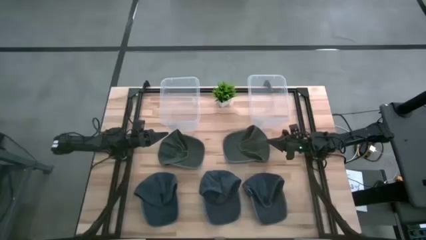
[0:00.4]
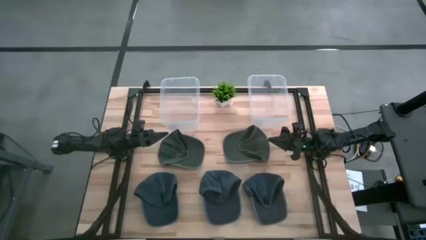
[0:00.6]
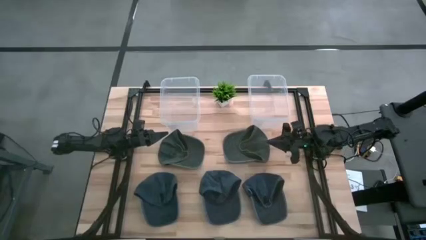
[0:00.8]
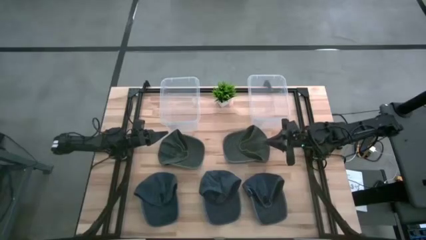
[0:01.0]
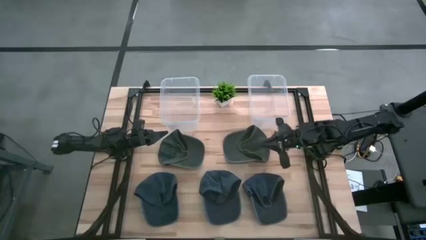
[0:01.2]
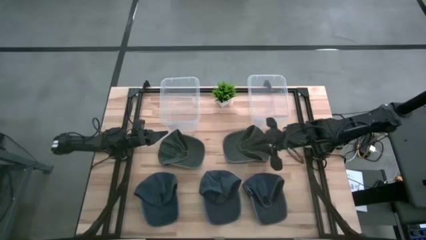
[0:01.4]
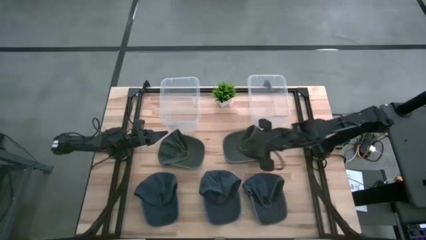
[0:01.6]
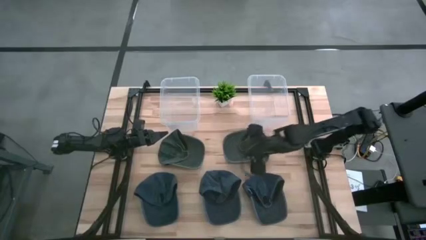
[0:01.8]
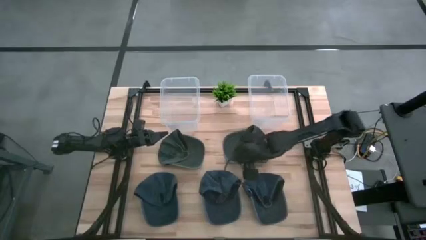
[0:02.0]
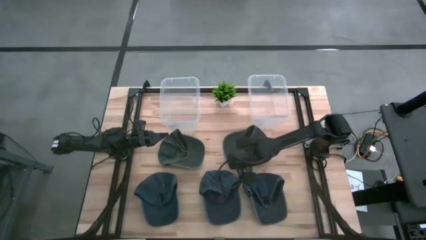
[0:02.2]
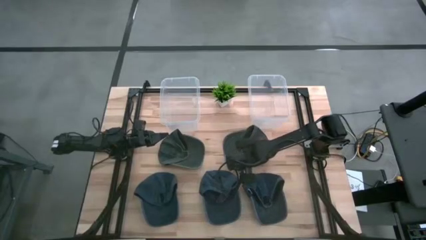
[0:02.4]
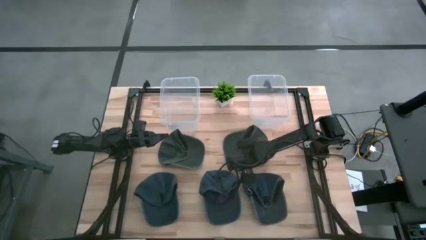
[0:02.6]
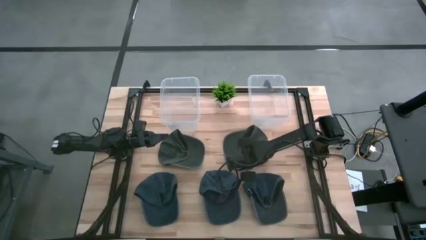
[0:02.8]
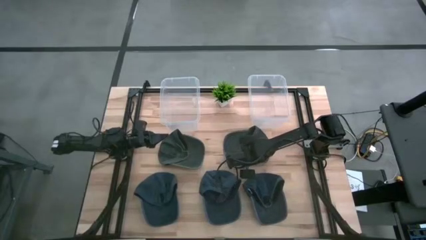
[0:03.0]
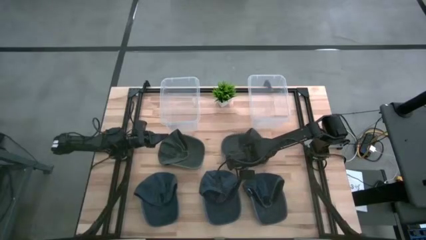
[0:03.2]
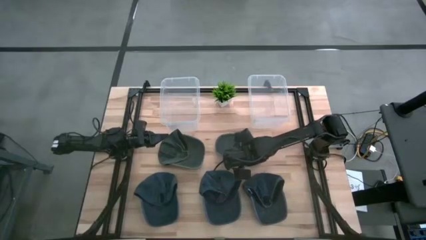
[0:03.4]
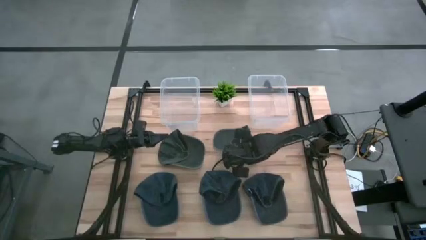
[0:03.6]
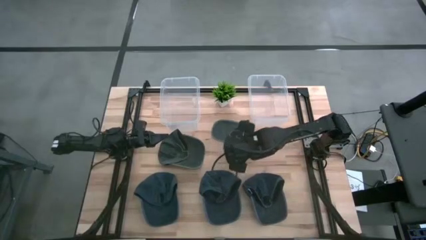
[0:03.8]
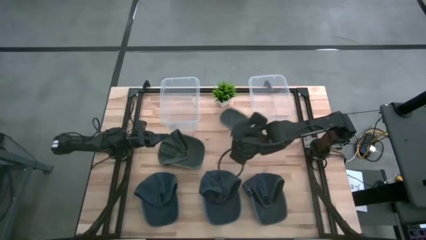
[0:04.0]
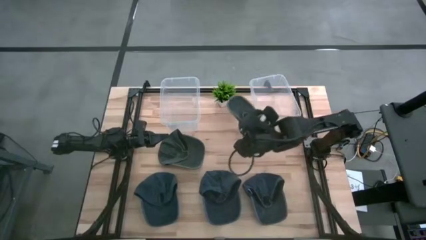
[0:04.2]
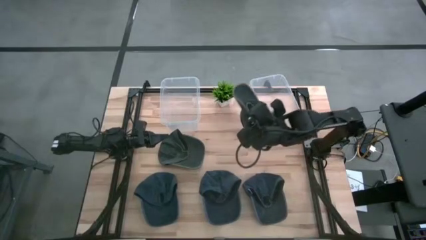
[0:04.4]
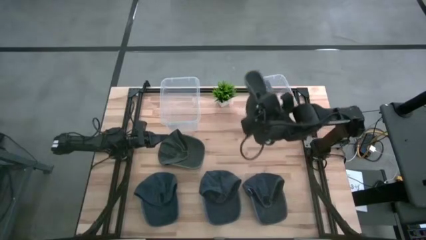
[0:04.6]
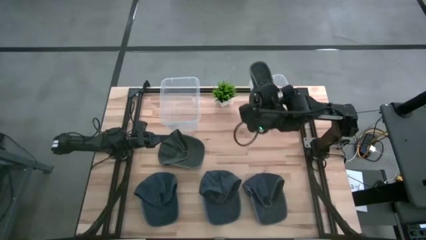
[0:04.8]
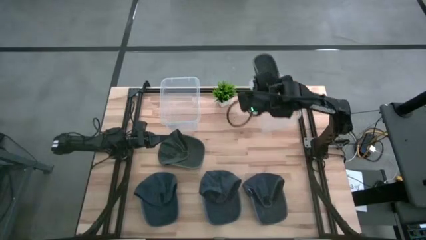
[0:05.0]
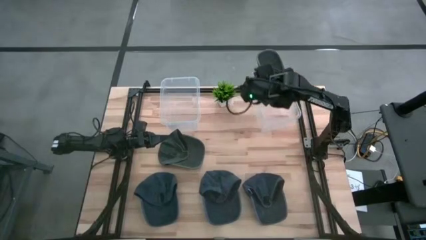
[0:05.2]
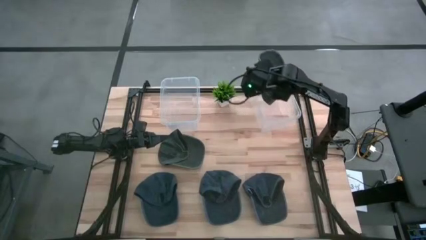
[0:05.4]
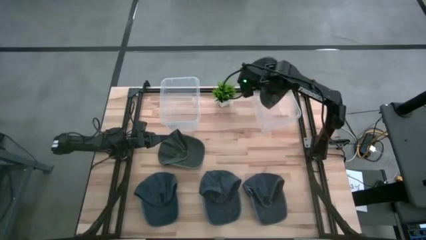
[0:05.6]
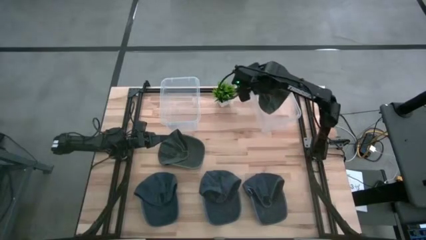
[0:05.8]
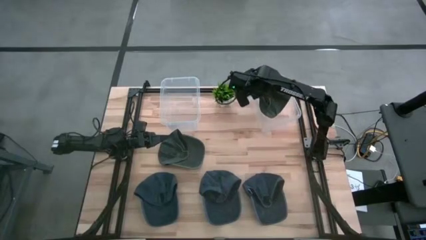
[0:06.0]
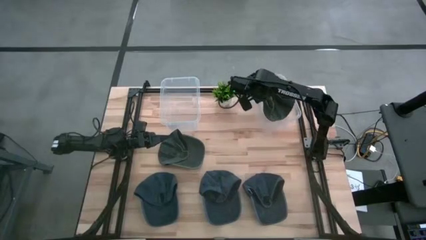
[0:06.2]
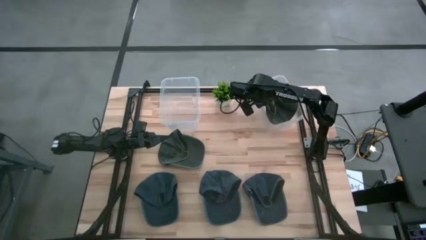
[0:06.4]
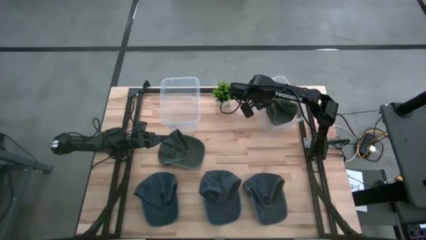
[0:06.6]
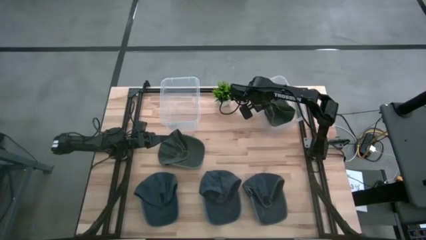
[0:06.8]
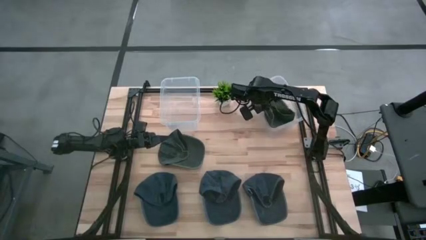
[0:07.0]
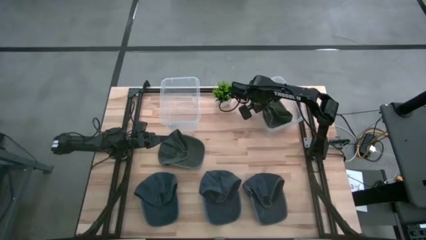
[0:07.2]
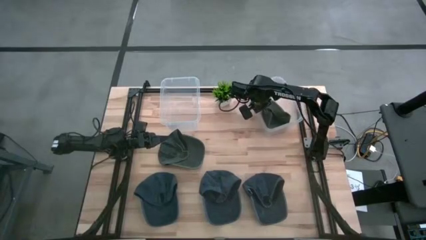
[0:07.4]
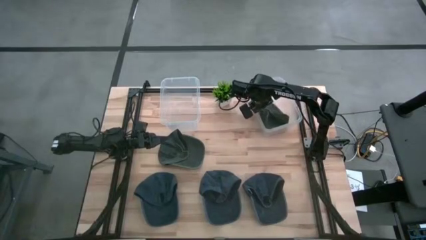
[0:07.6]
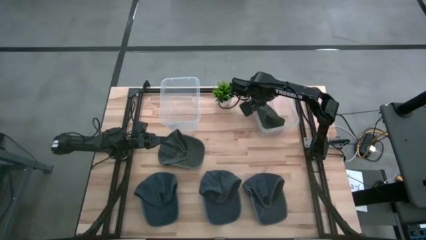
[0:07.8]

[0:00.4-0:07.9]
Task: Pick & Place hat
Put the top right gray cap into the right transparent bin
